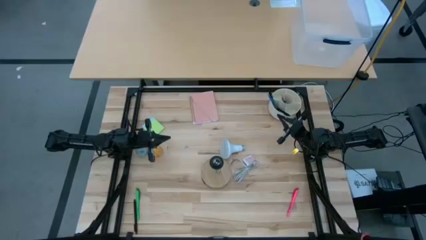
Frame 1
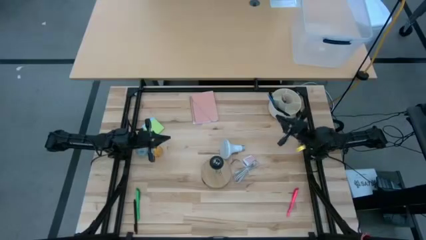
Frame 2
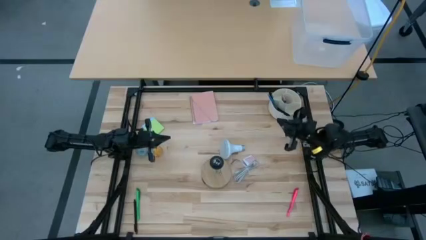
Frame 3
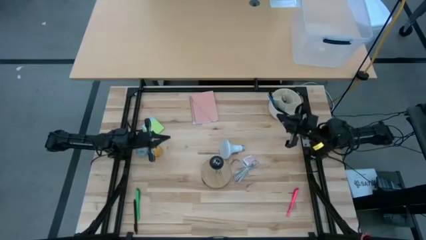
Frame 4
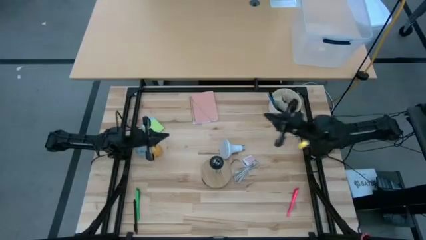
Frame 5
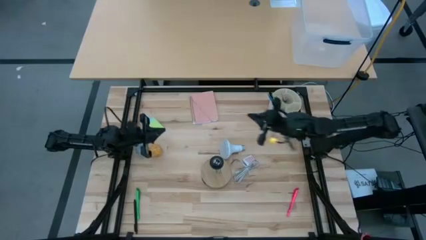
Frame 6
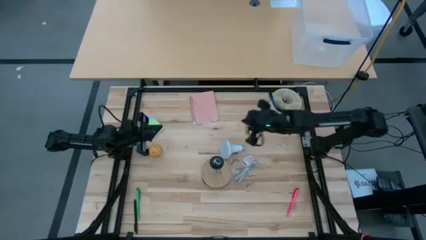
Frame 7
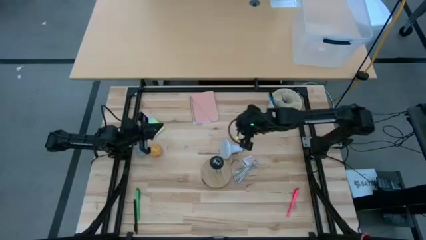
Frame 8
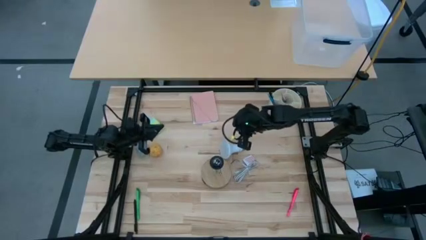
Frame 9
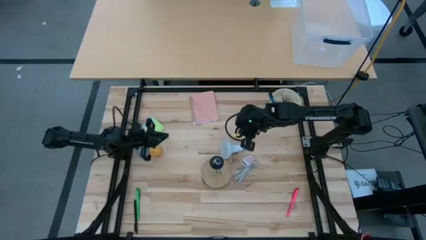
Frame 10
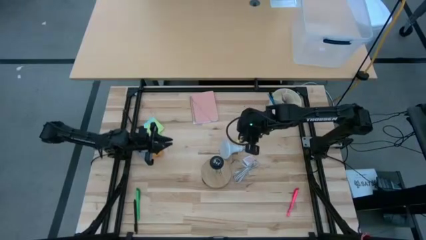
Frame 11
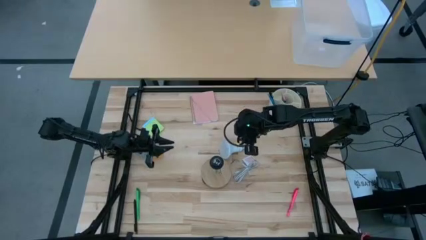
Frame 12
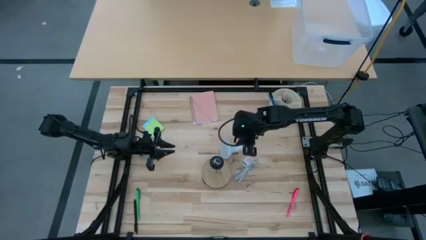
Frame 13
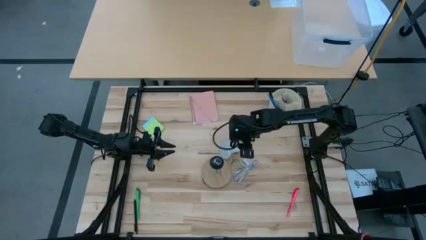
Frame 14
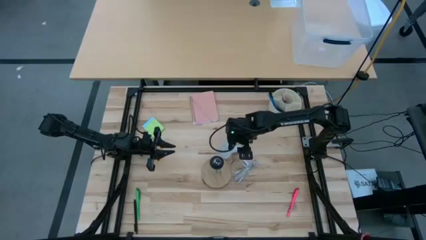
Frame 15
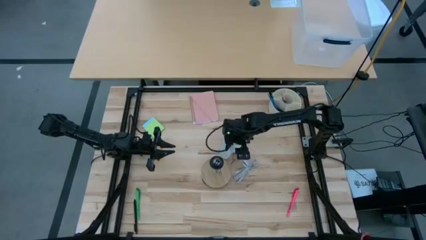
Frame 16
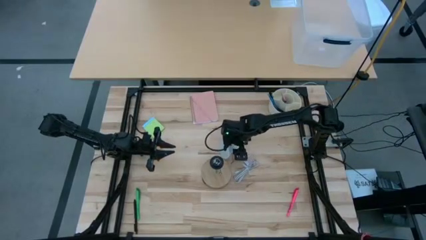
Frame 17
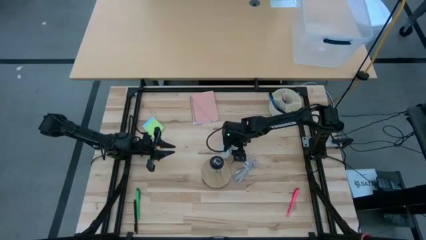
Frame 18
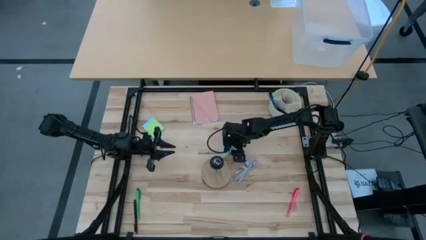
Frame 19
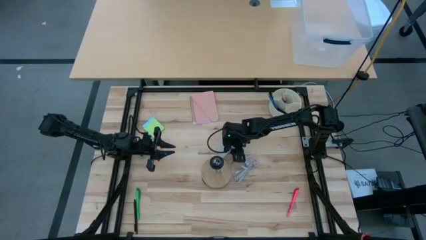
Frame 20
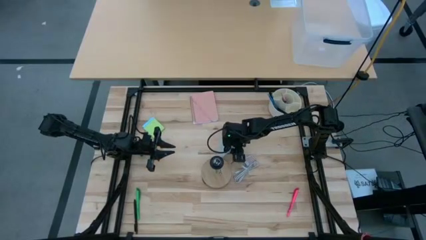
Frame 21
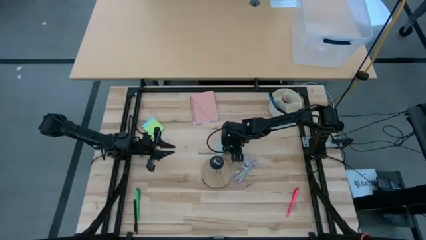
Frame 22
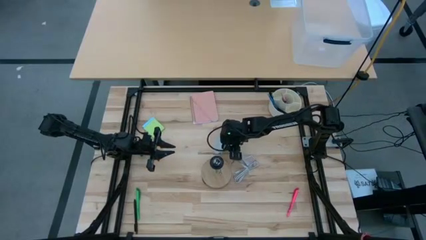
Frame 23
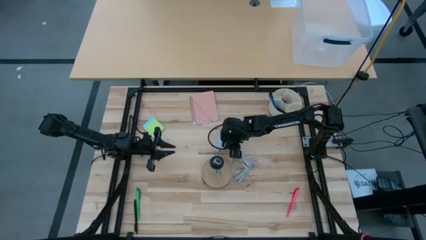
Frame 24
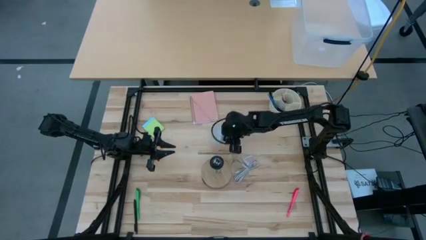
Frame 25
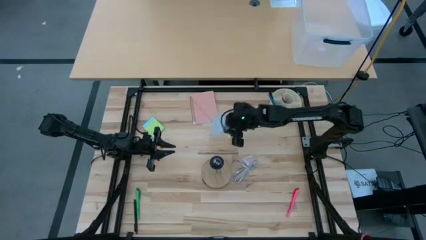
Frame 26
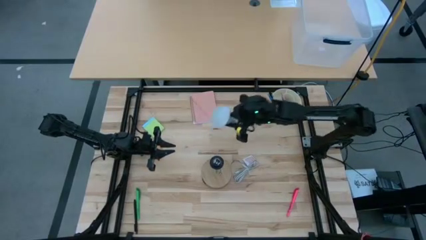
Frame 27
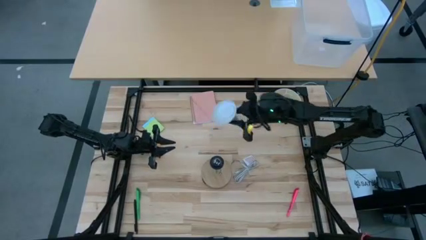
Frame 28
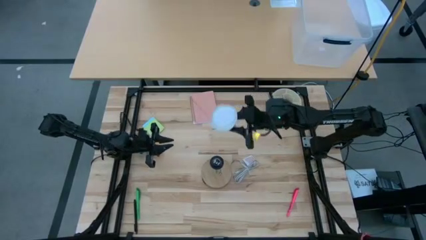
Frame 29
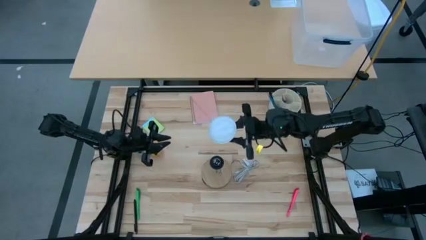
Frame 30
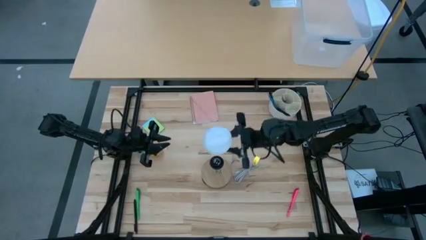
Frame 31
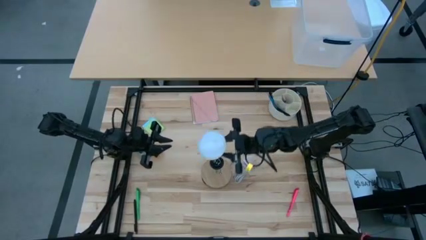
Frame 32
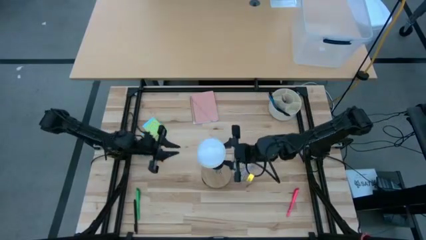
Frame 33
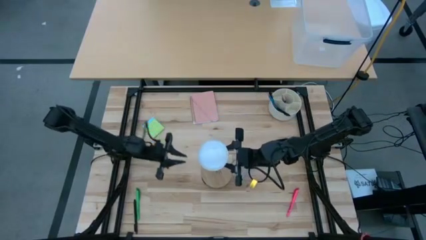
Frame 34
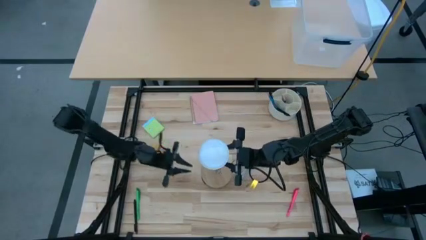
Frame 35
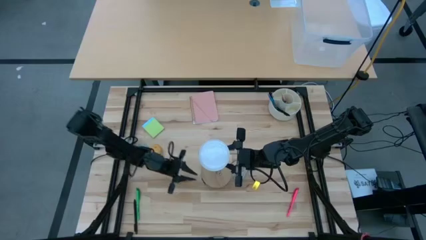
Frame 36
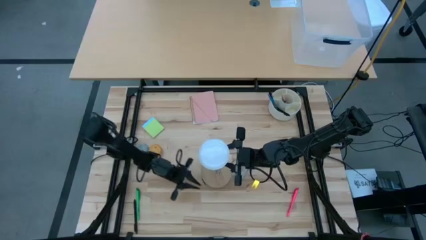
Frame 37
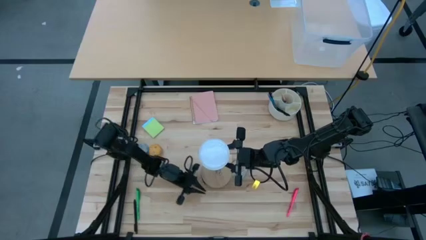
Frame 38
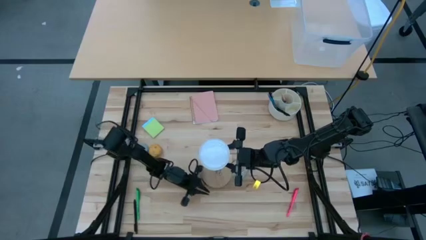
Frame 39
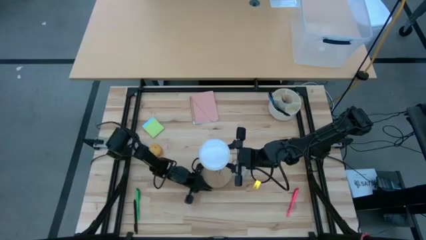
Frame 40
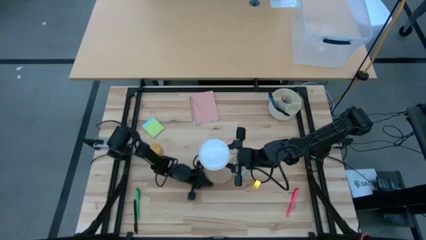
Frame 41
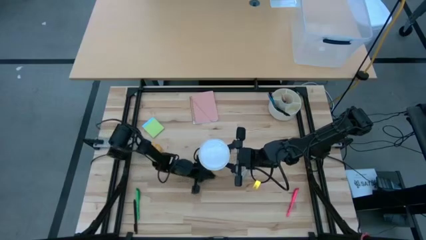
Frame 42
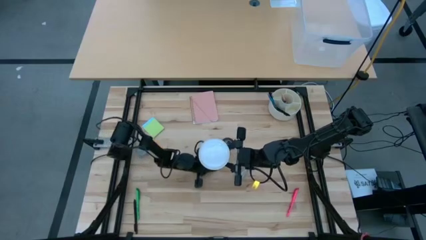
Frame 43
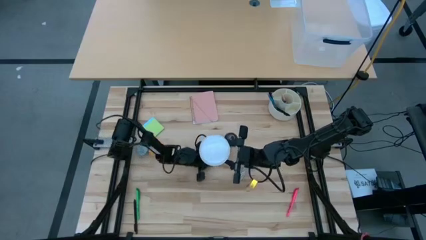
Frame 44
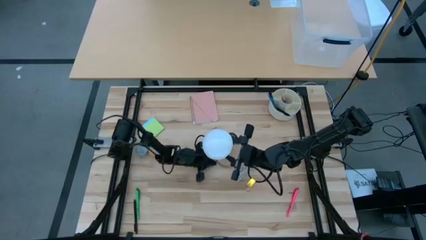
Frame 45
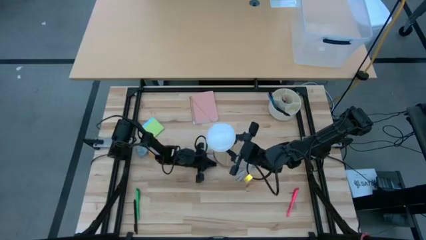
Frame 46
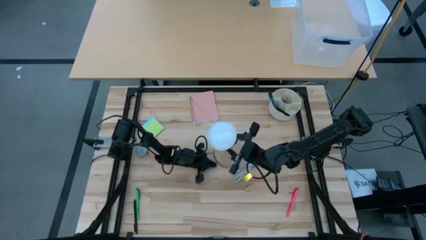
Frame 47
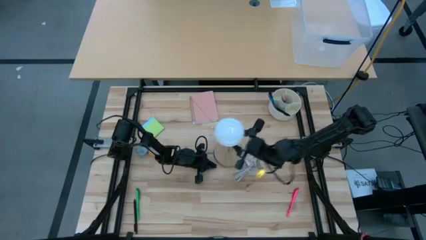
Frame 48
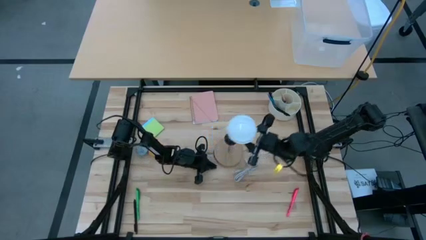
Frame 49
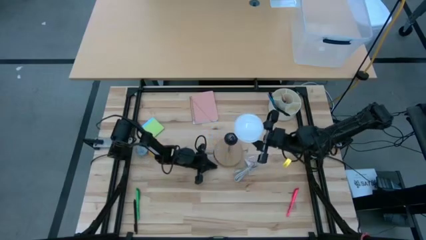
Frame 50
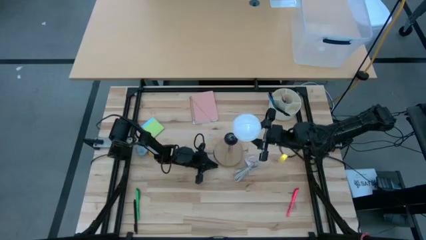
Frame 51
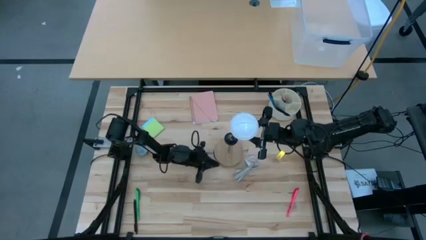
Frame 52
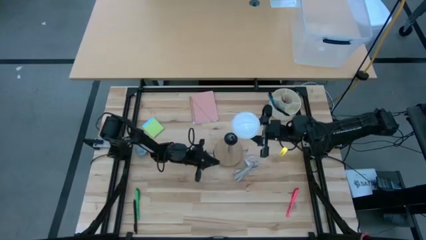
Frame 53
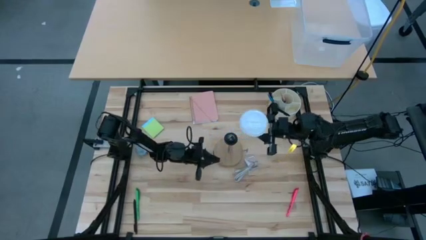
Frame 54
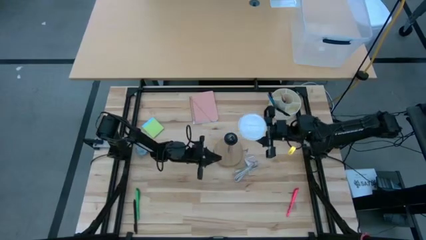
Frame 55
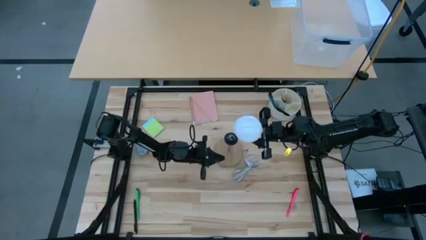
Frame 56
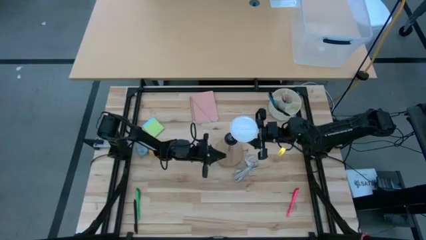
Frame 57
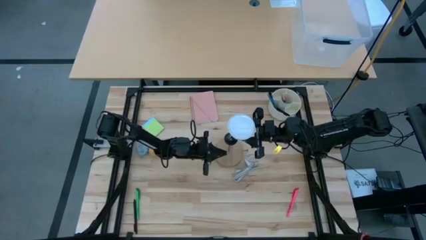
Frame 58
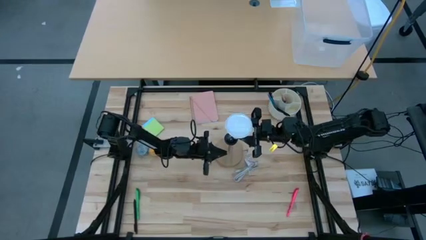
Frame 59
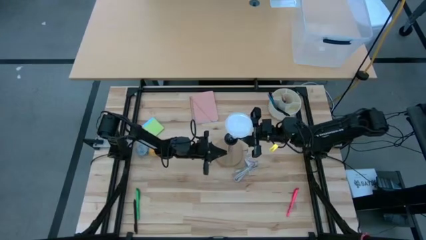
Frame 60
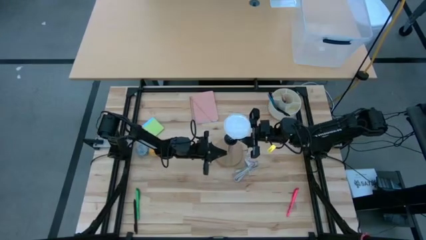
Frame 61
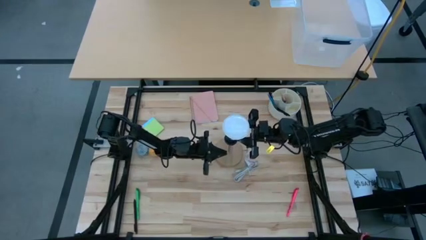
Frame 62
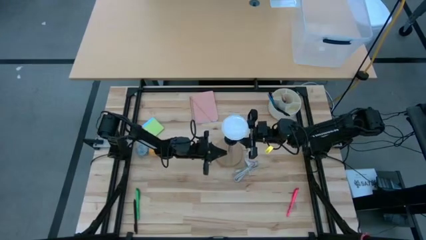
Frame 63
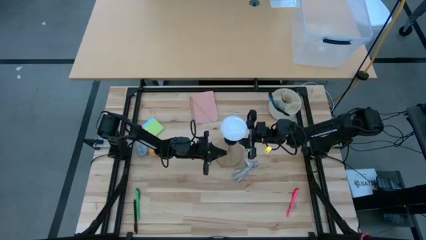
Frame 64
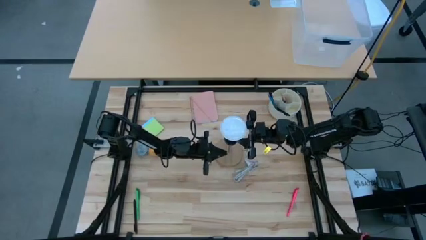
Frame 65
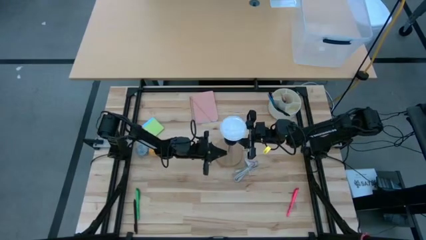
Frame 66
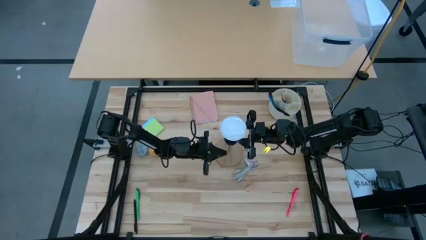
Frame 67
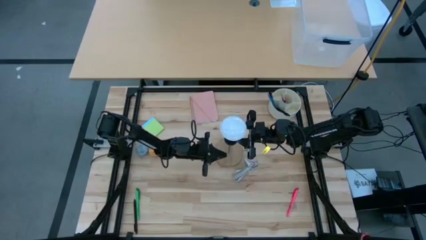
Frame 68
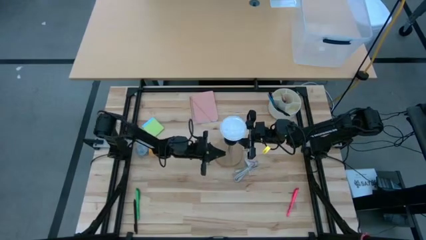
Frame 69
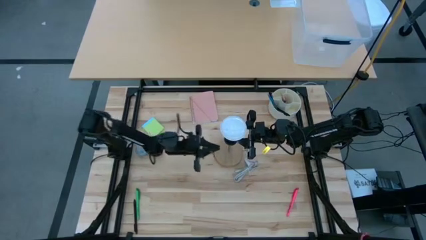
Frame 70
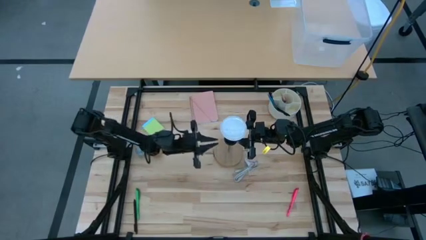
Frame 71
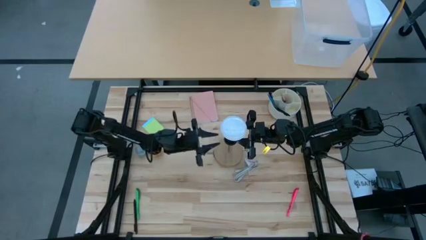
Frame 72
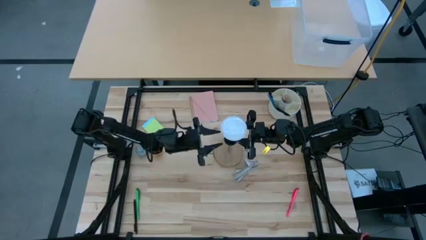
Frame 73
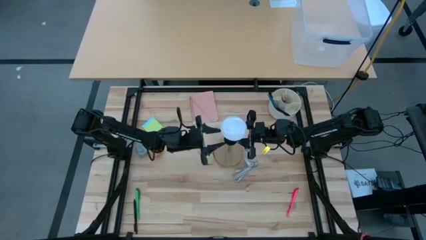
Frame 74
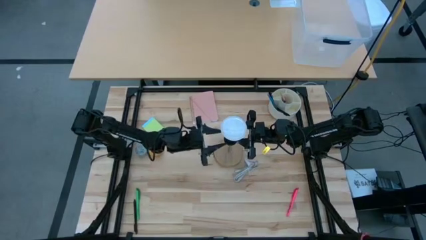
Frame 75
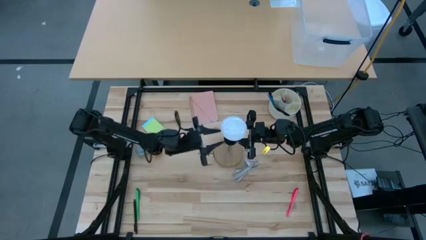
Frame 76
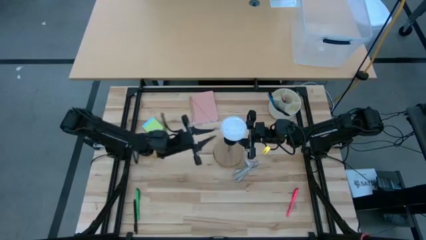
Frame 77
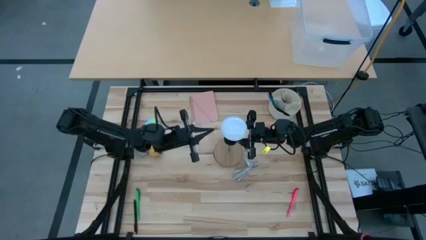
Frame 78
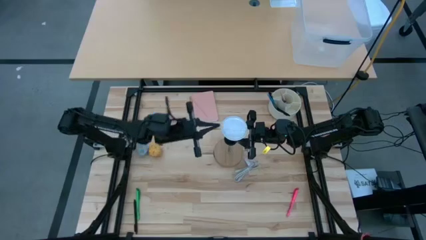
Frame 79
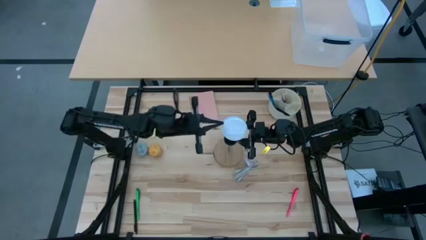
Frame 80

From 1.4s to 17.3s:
Task: Screw lightbulb
Insert the lightbulb into the lamp
